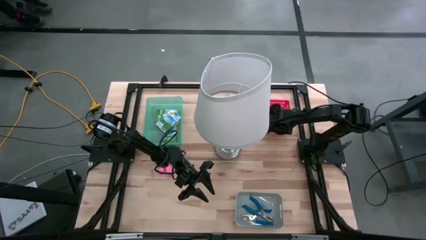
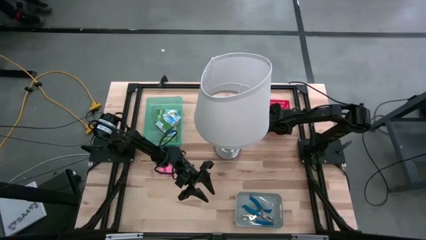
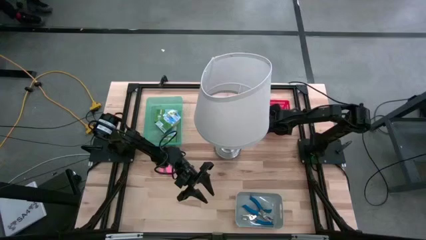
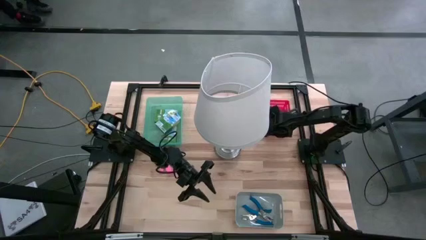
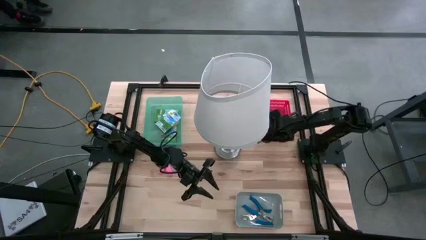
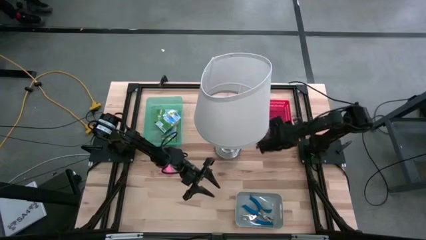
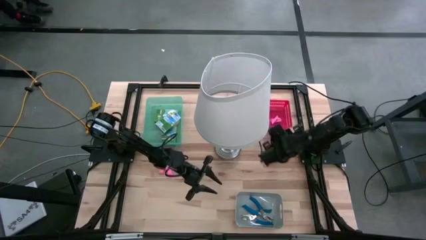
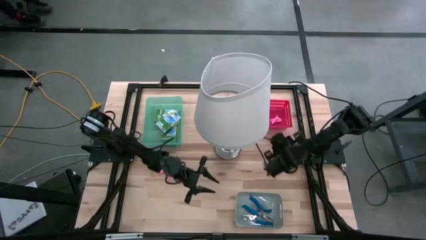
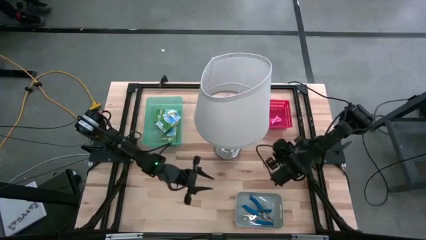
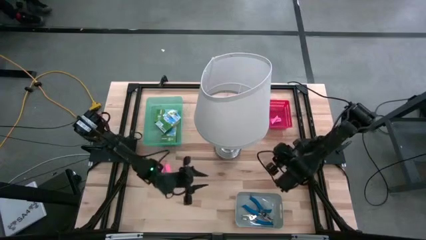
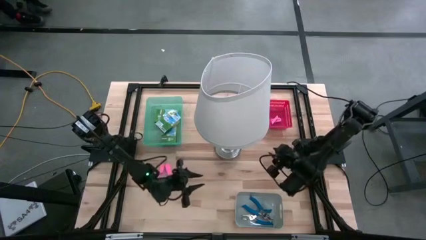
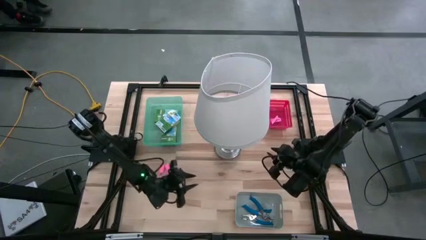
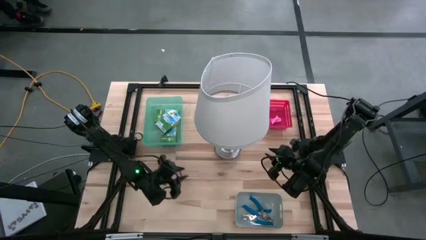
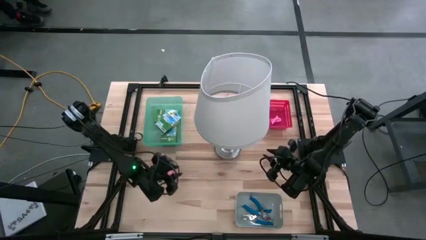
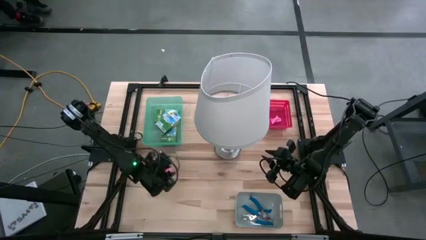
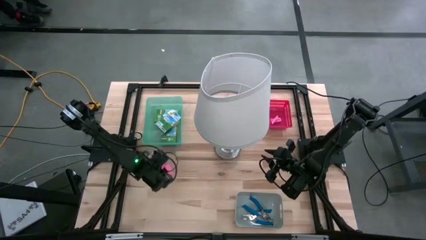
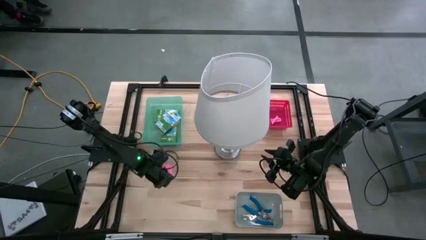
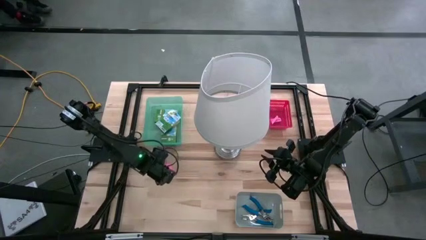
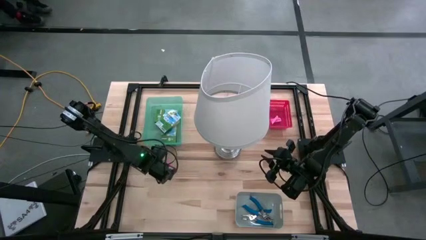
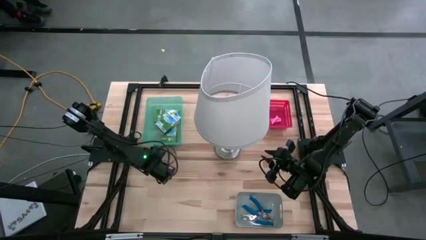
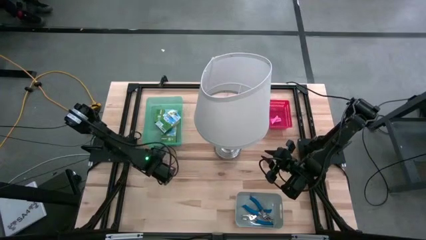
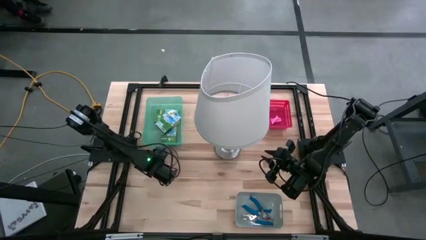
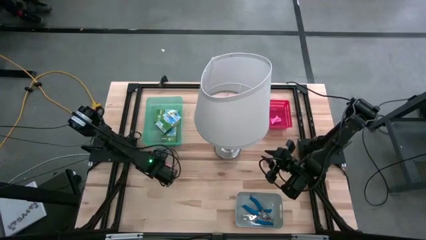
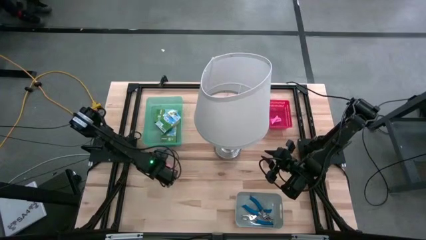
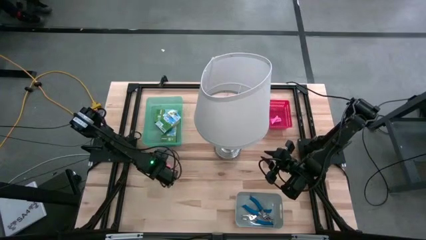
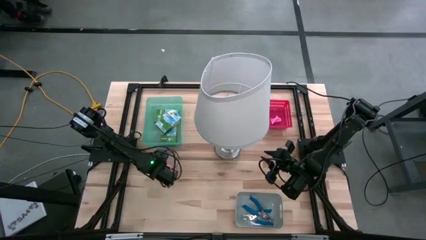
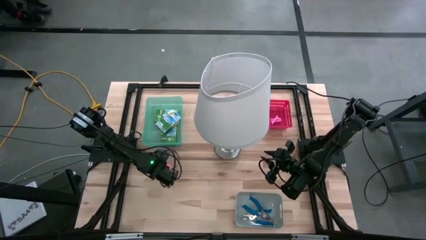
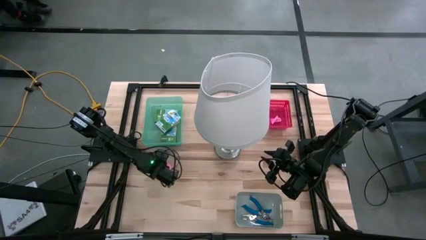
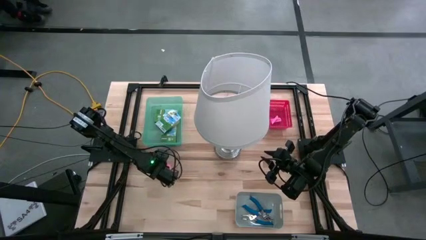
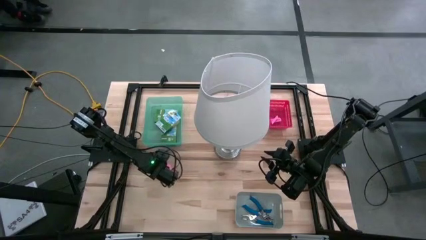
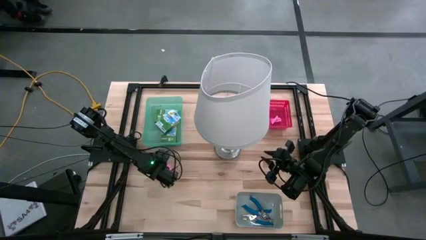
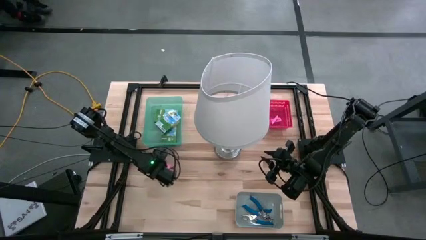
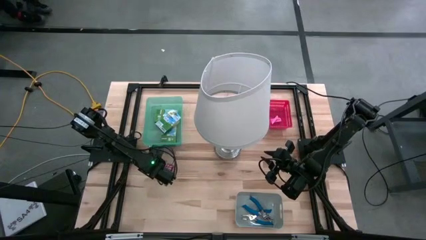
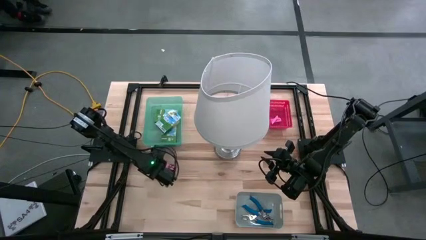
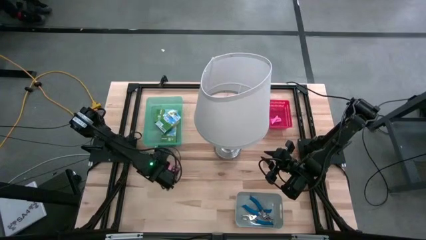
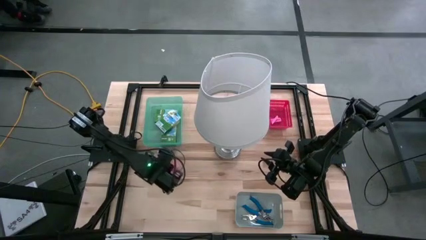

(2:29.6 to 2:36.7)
Task: Pick & Place School Supplies
Put the pink eraser into the red bin

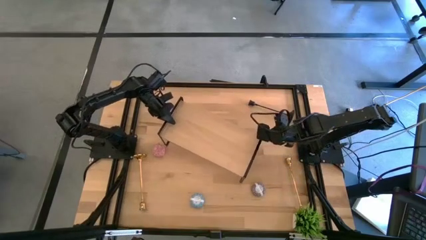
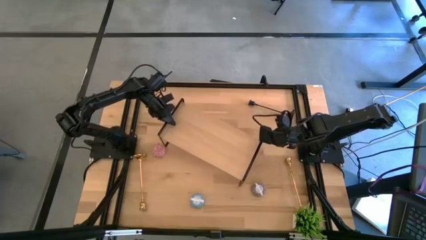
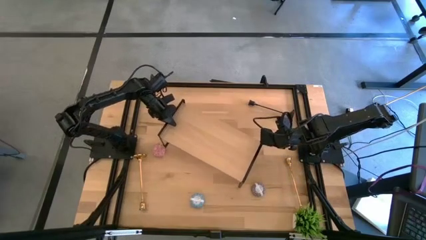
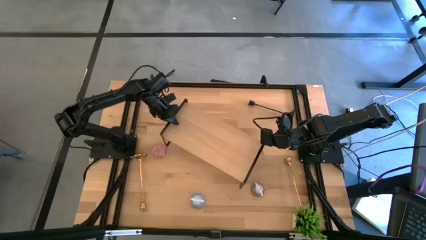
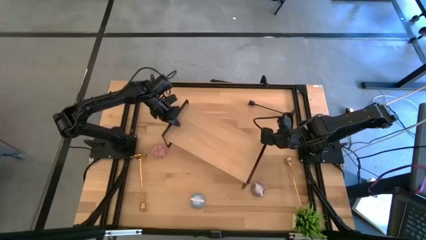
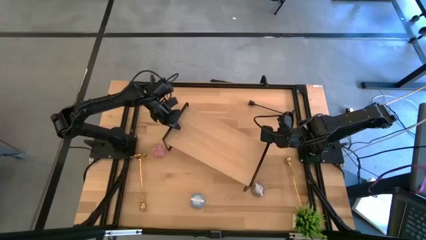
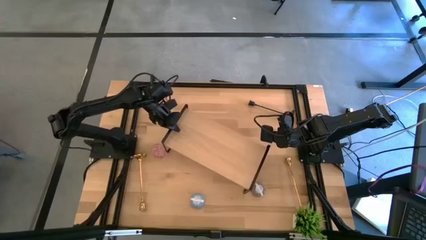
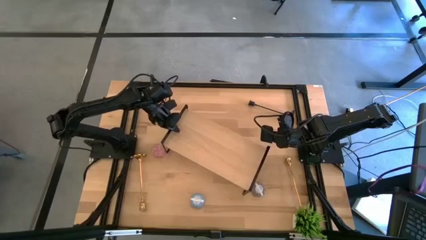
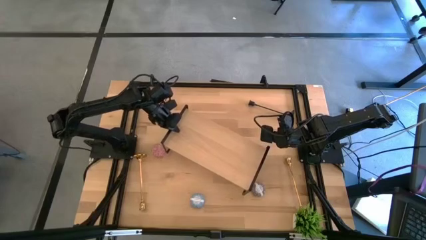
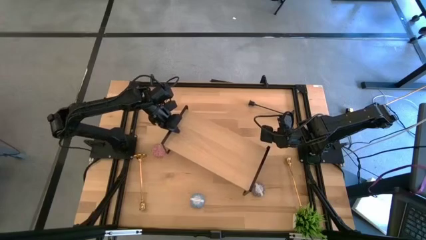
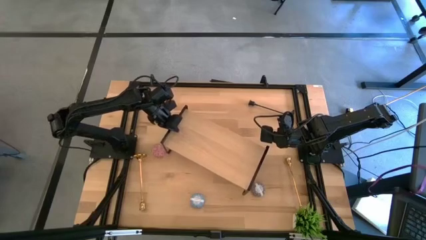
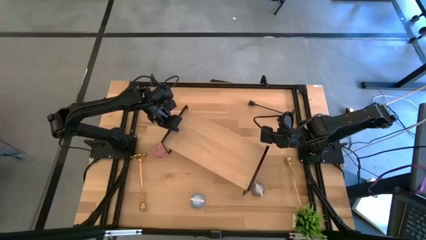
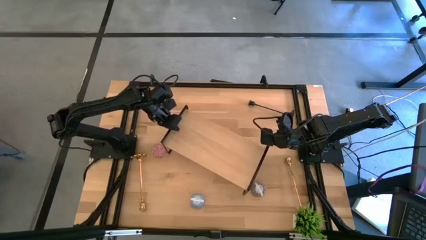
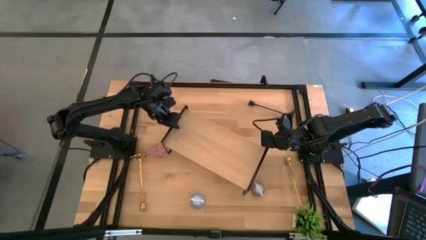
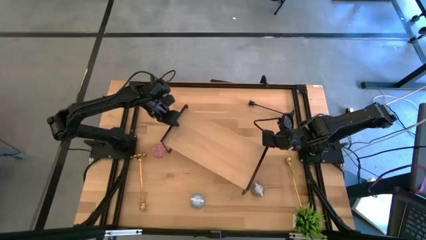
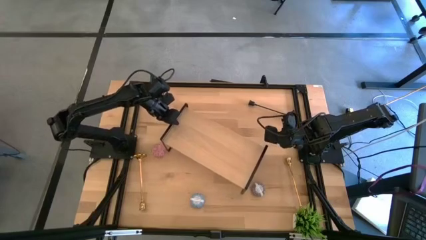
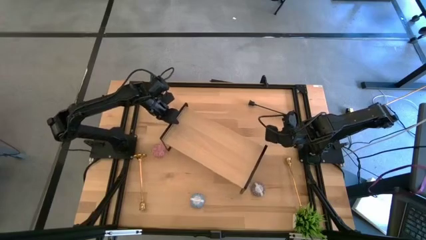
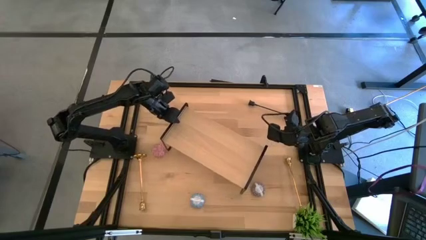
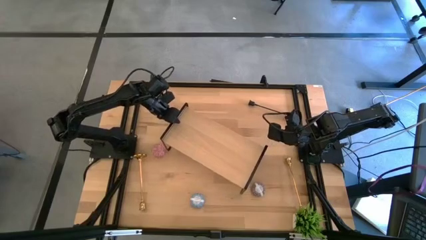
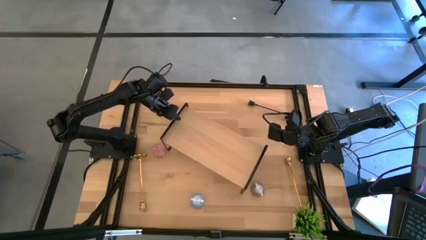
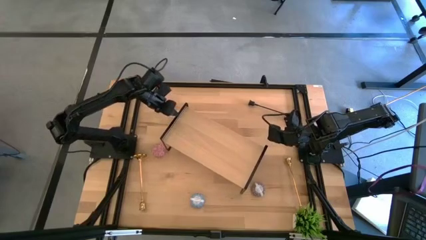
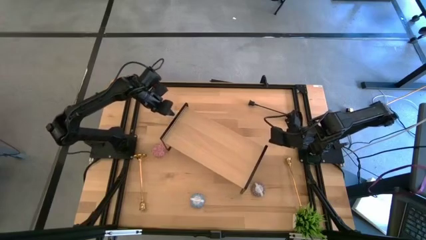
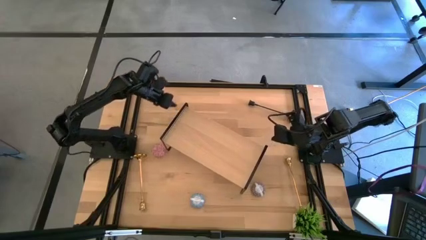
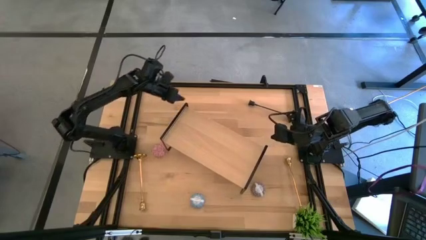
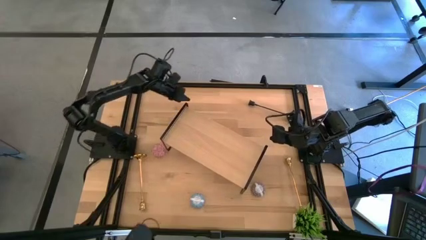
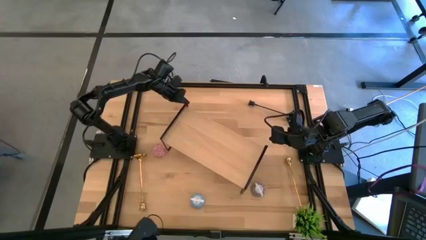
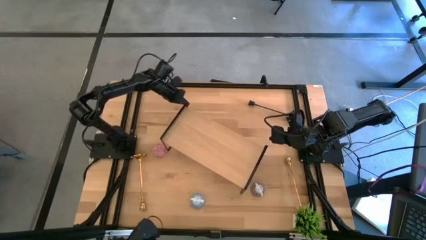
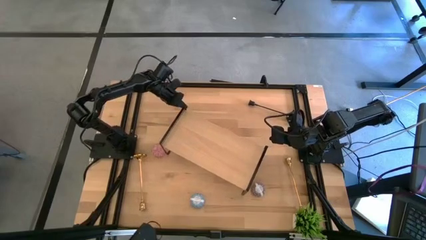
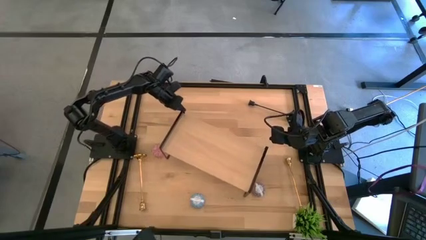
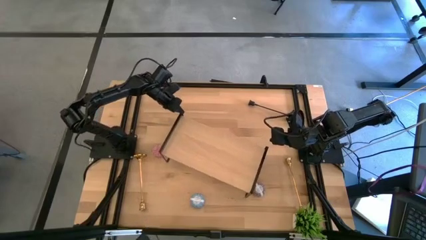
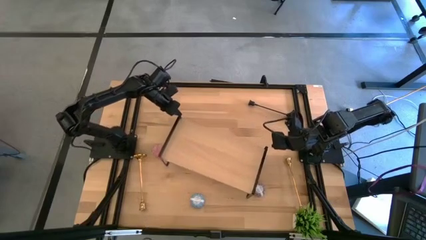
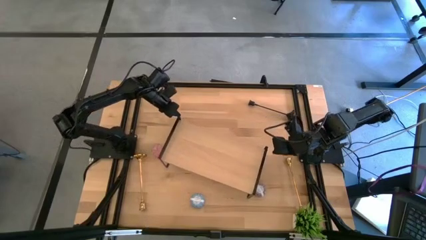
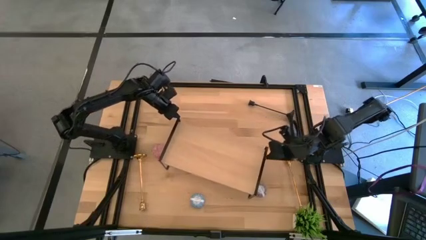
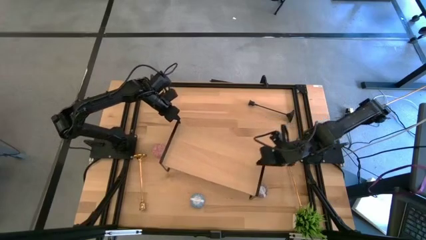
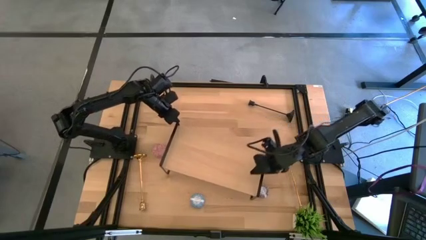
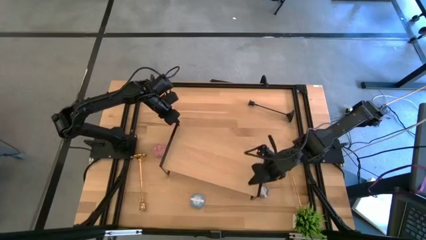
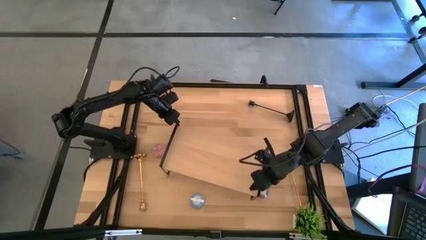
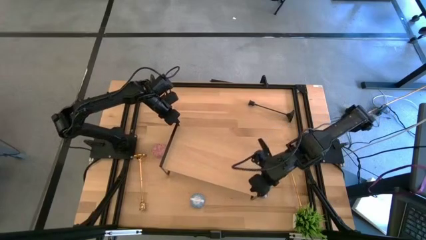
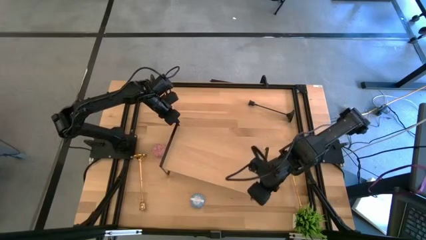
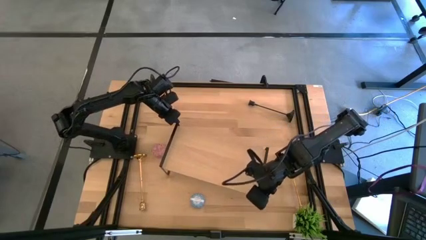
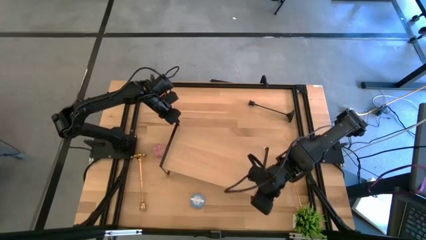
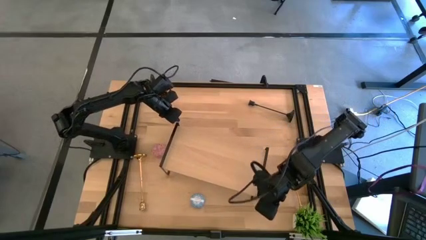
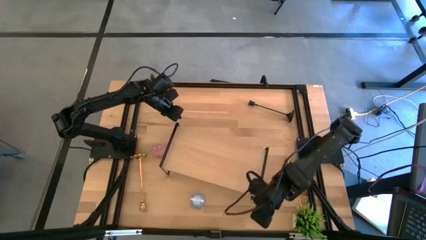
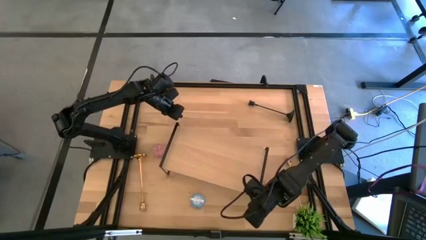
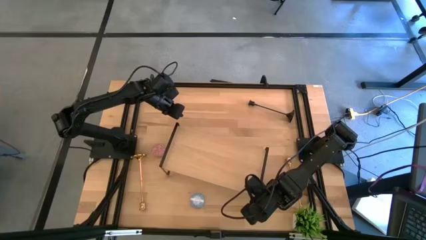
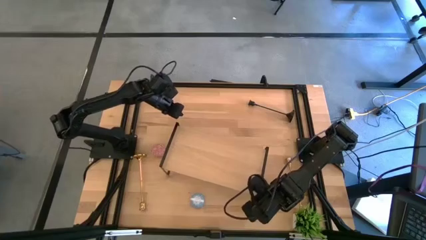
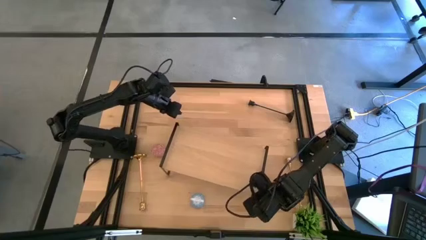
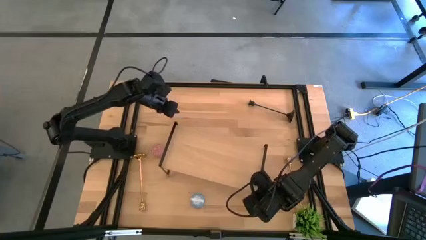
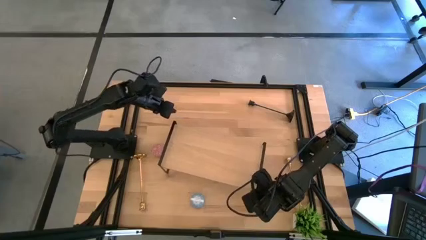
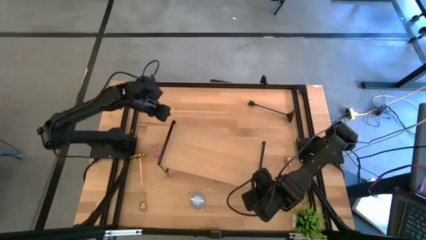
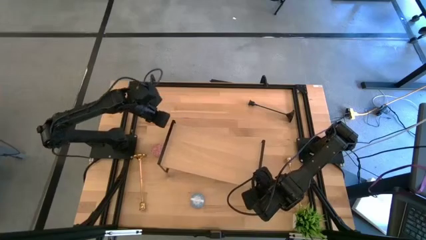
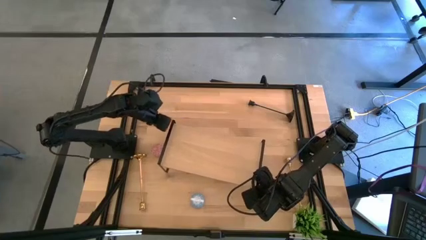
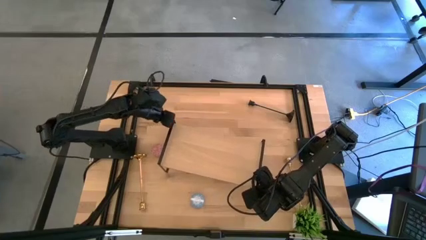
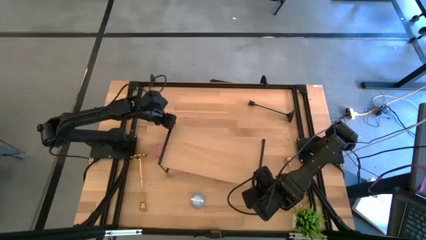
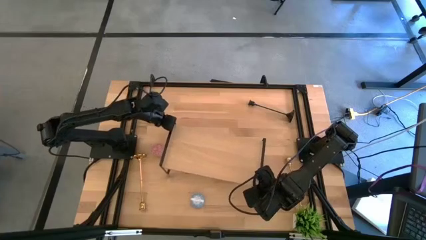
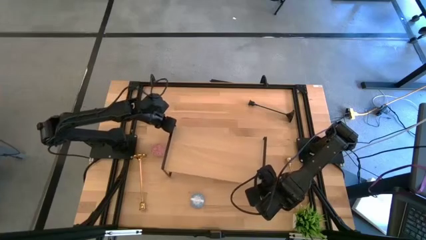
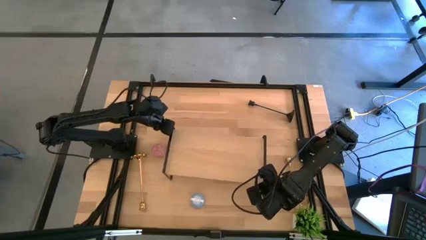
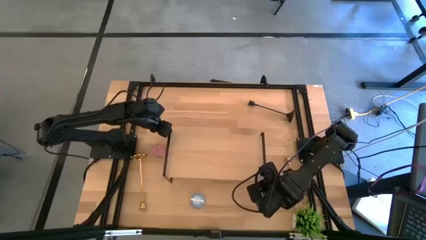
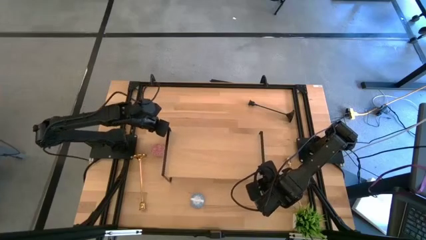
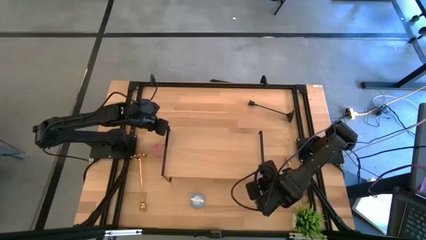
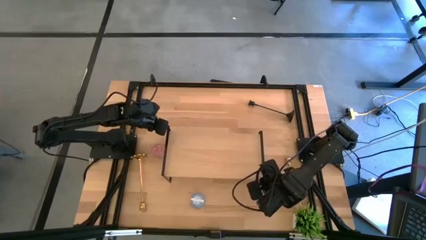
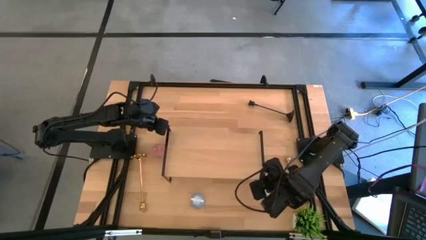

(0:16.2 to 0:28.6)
Task: Pick & Place candle stick holders
Adjust the shelf
